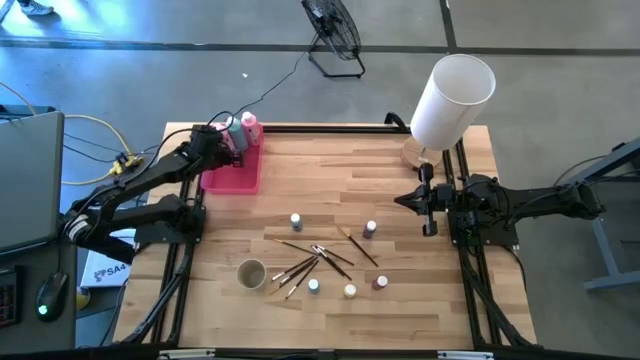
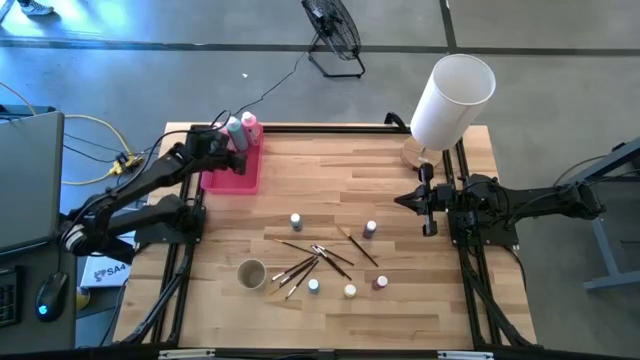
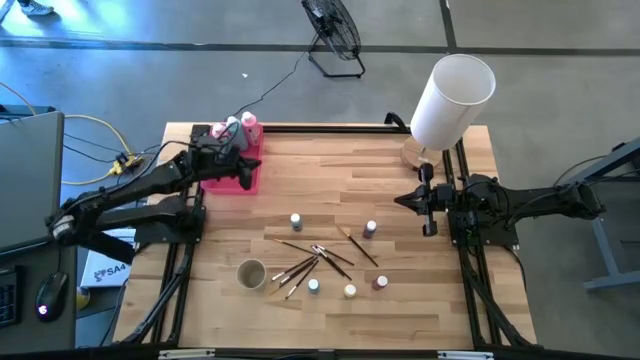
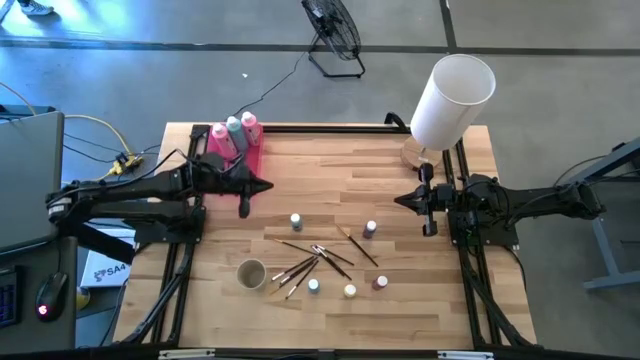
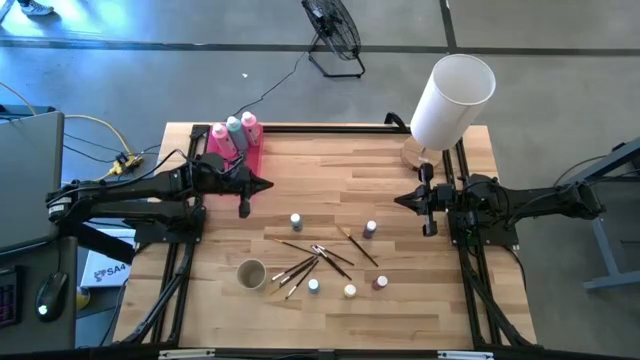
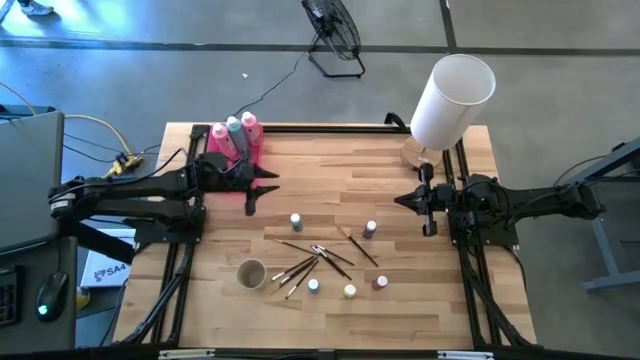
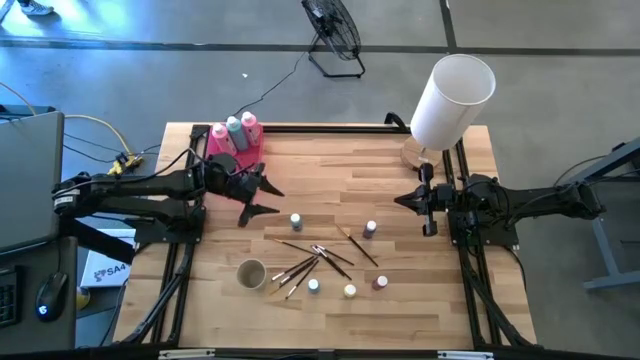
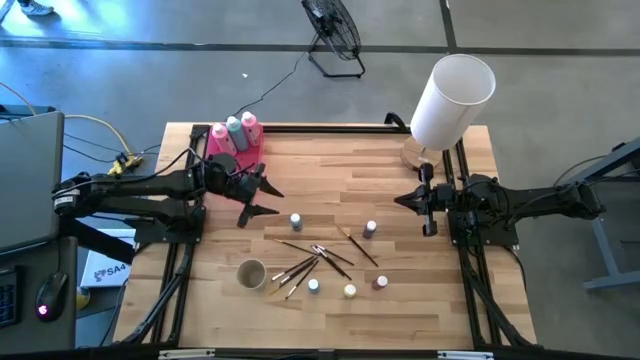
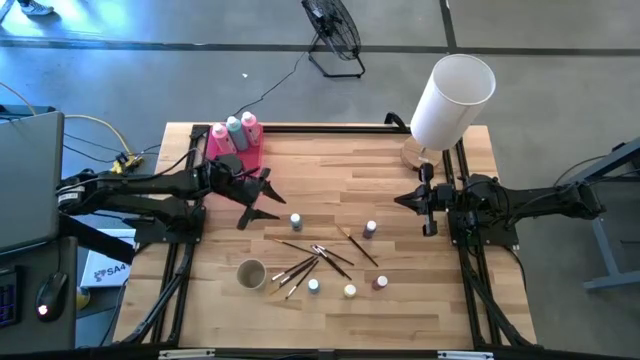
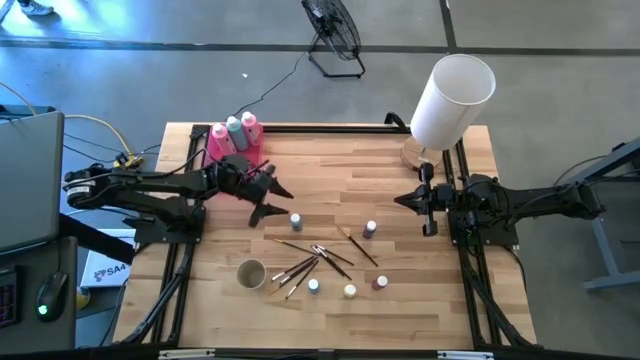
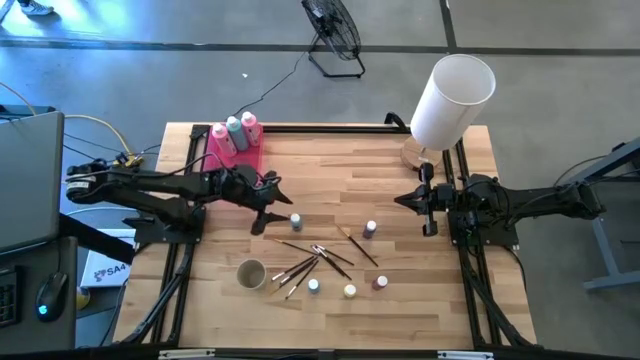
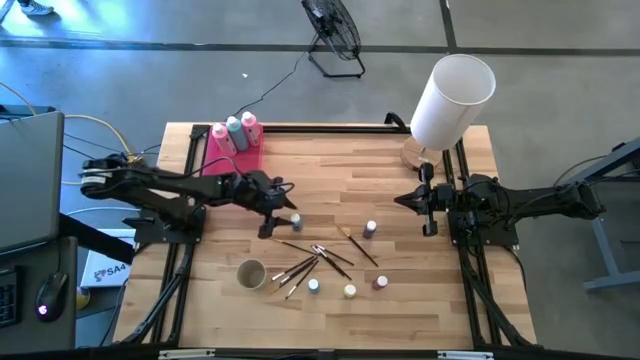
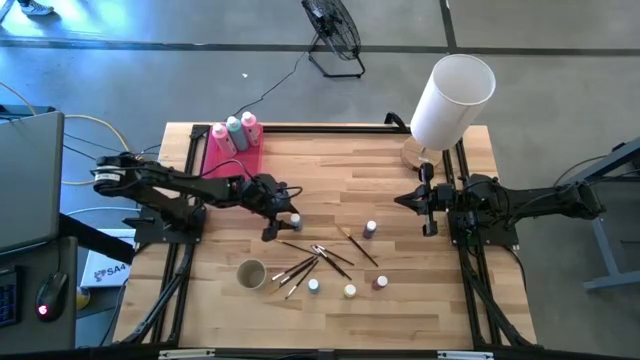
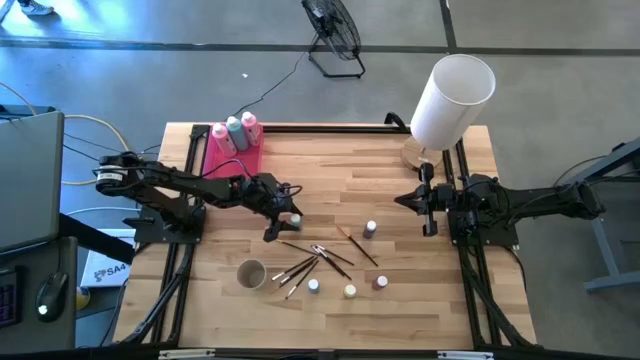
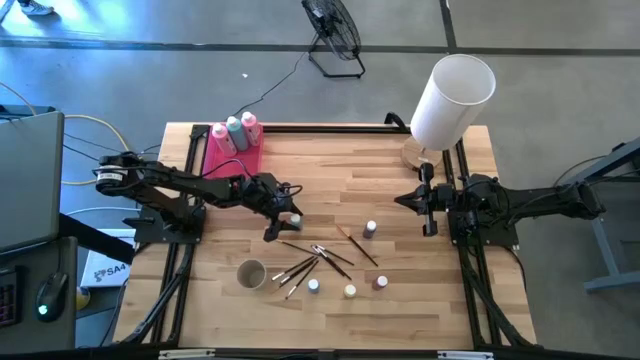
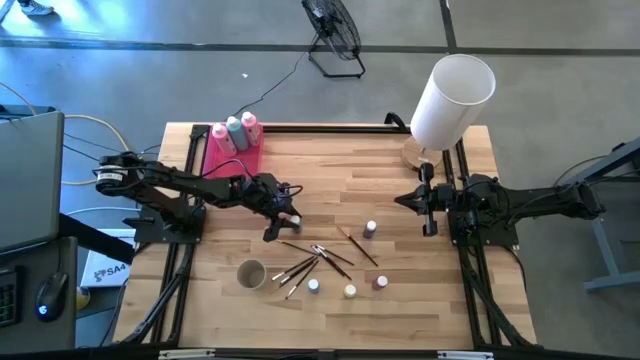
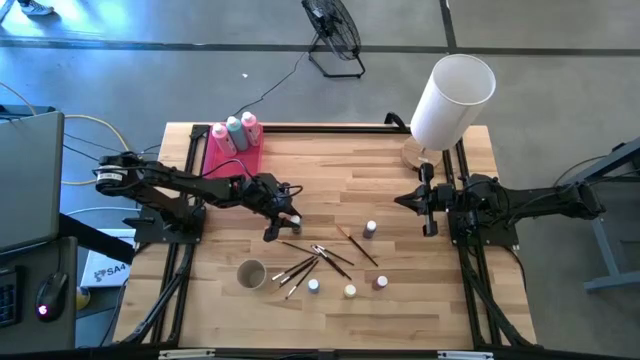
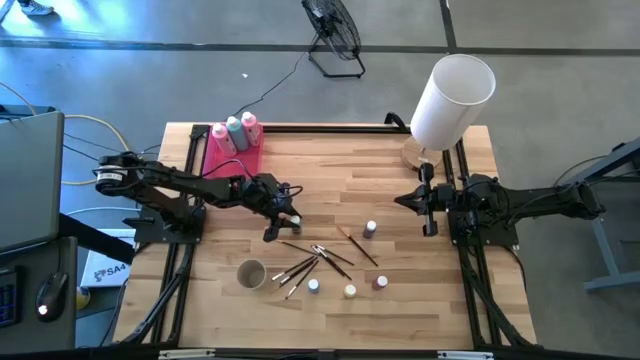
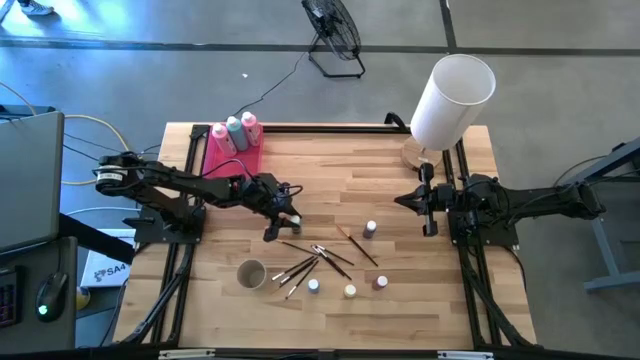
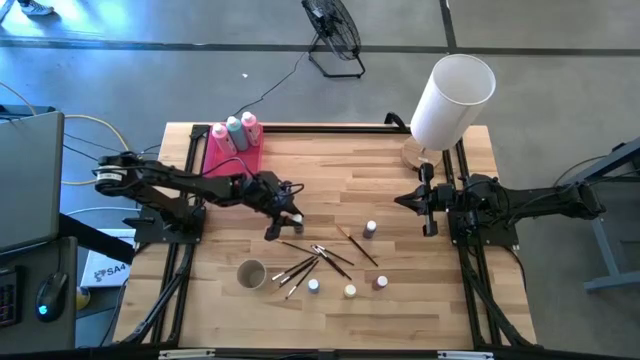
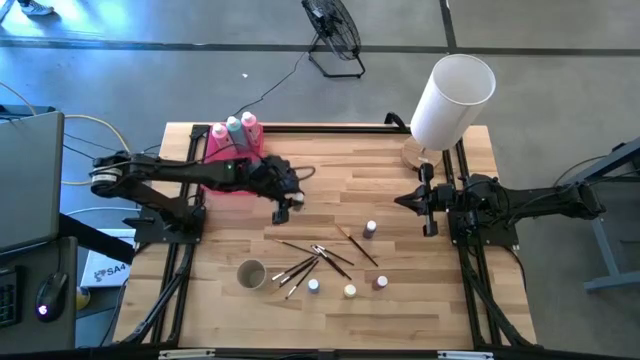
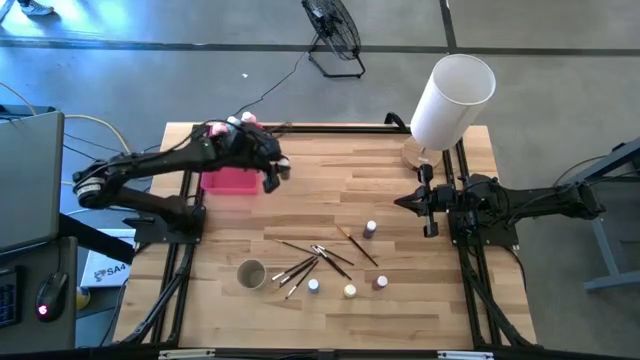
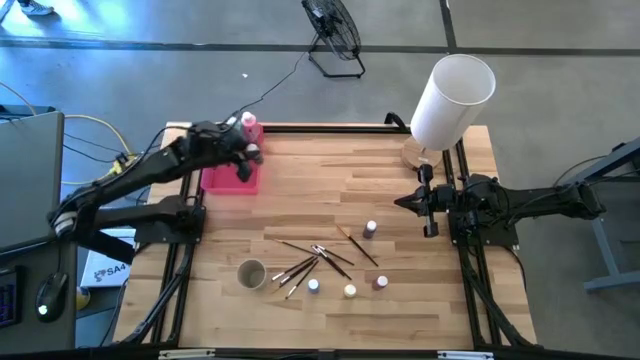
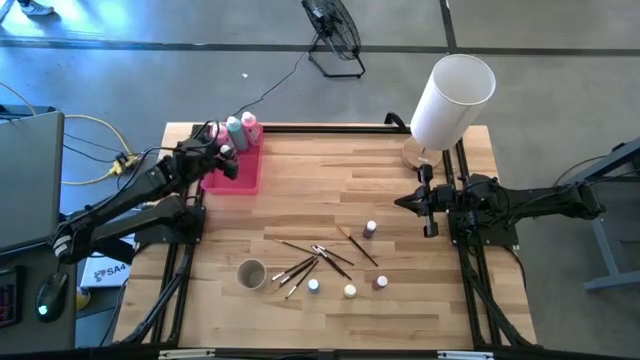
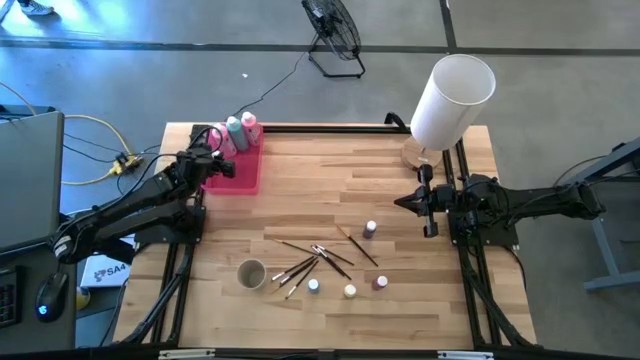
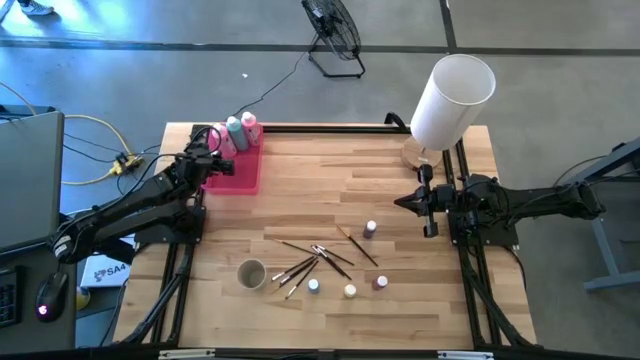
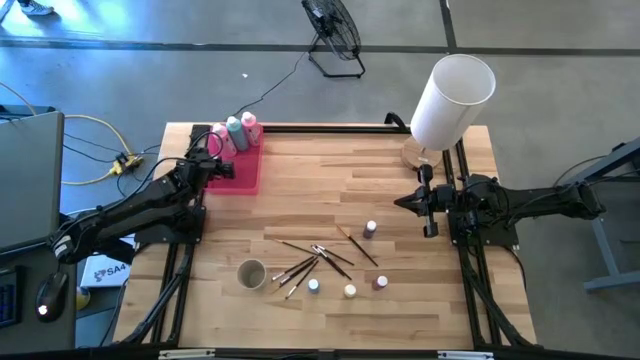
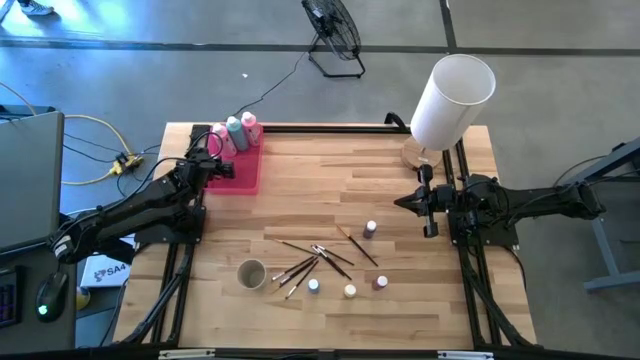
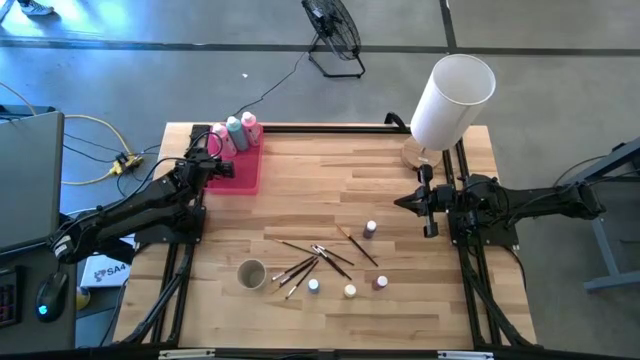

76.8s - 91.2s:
Task: Pick & Place Paint Supplies
Put the small light blue paint bottle into the pink bin
